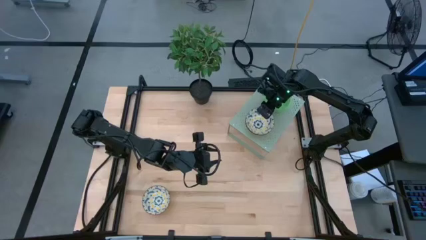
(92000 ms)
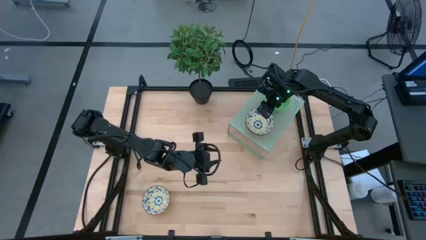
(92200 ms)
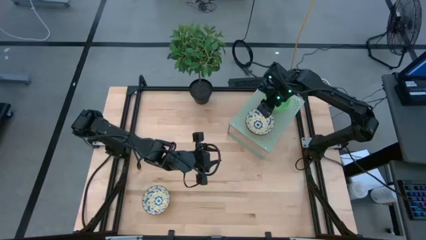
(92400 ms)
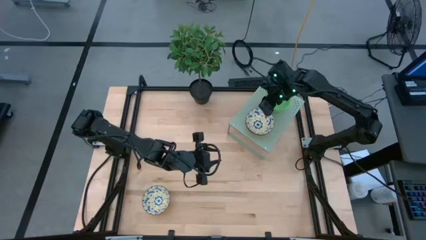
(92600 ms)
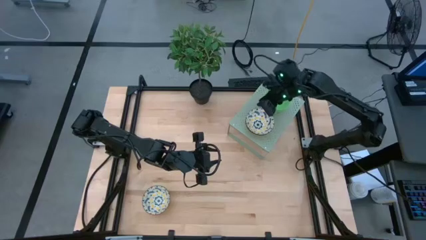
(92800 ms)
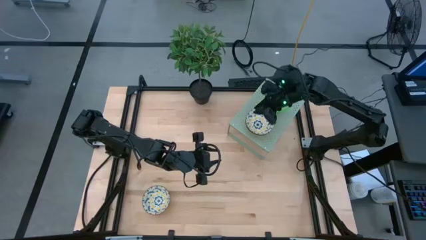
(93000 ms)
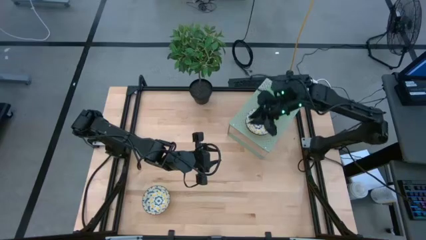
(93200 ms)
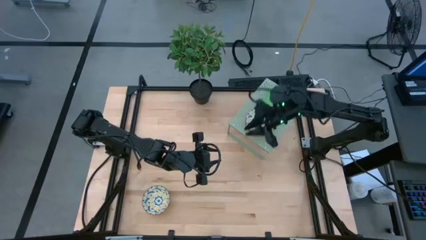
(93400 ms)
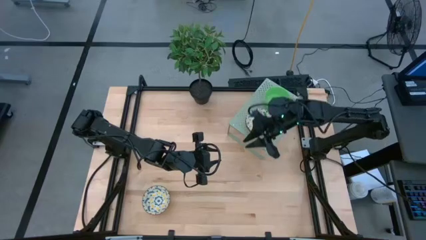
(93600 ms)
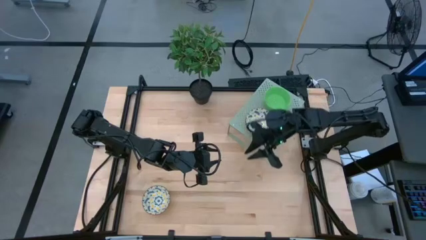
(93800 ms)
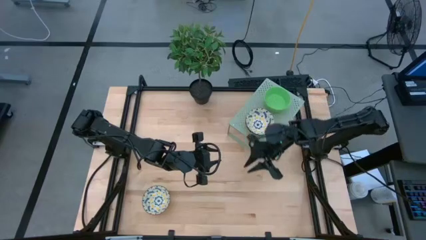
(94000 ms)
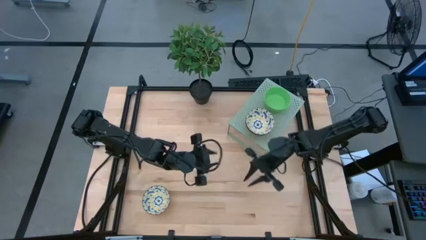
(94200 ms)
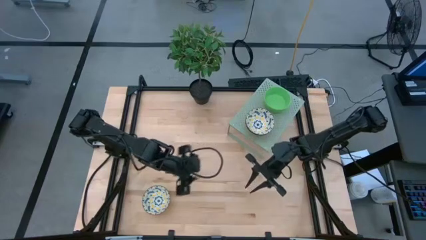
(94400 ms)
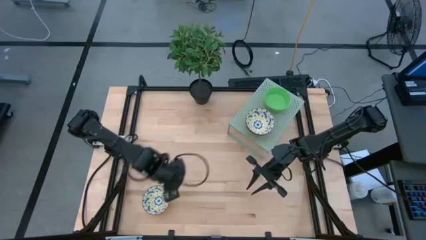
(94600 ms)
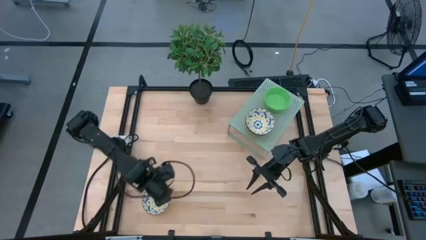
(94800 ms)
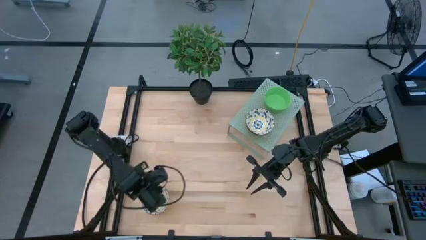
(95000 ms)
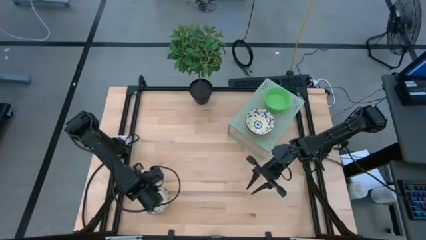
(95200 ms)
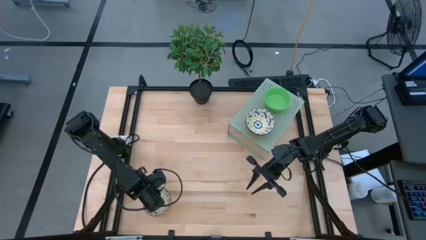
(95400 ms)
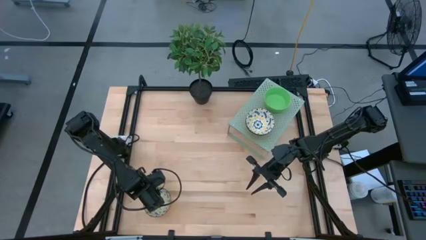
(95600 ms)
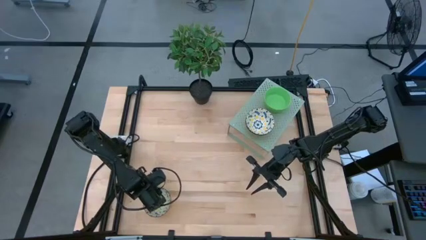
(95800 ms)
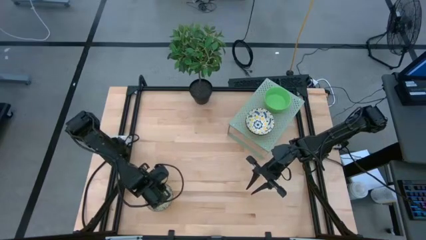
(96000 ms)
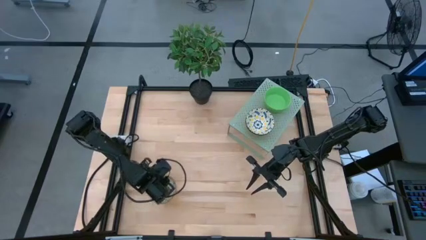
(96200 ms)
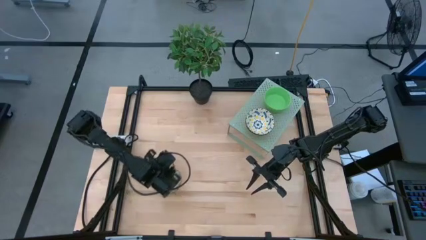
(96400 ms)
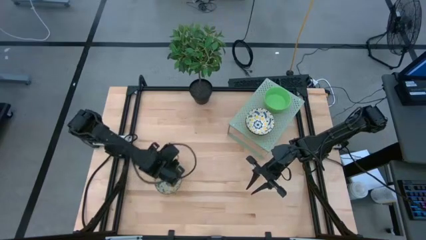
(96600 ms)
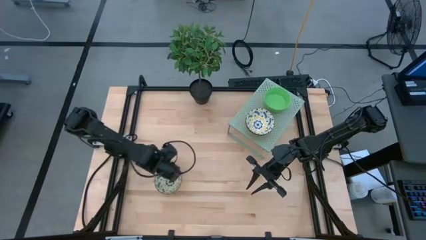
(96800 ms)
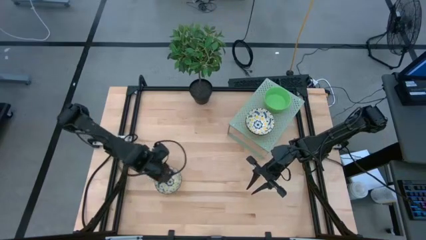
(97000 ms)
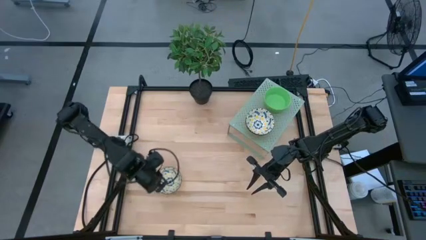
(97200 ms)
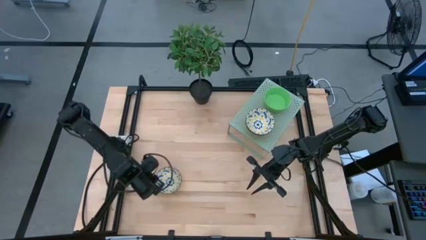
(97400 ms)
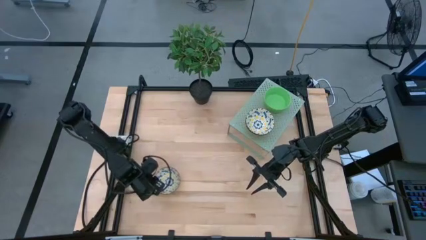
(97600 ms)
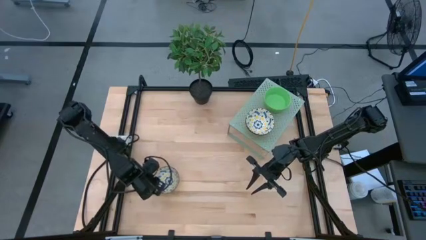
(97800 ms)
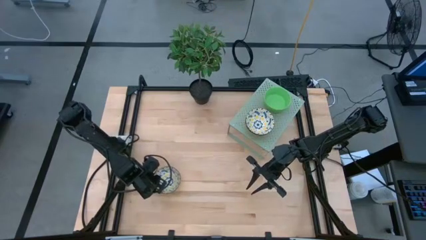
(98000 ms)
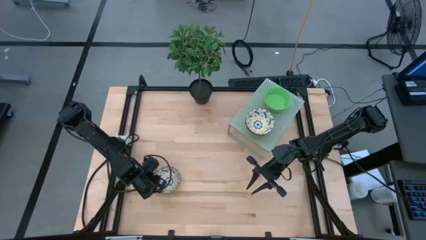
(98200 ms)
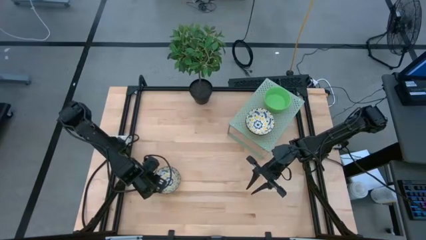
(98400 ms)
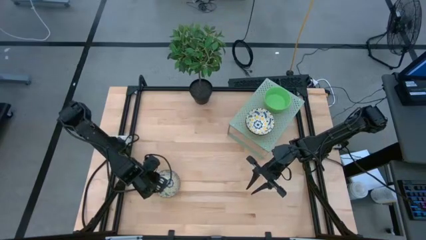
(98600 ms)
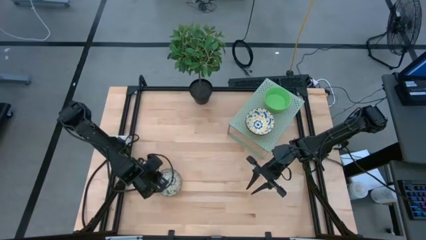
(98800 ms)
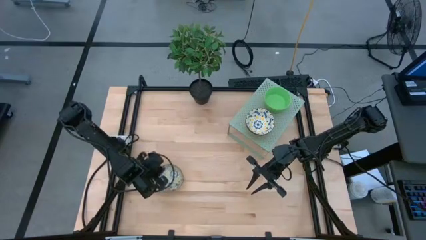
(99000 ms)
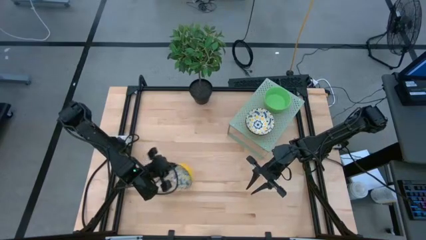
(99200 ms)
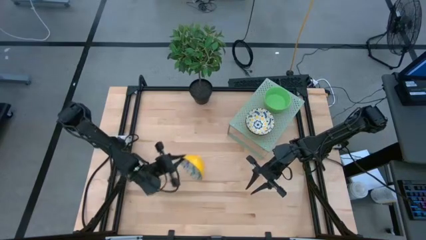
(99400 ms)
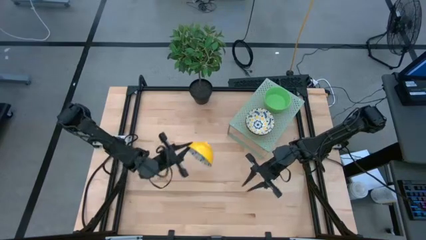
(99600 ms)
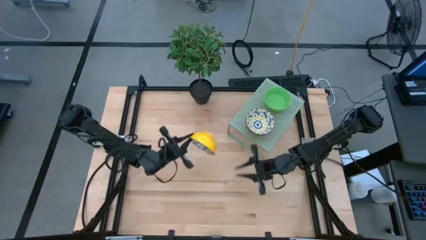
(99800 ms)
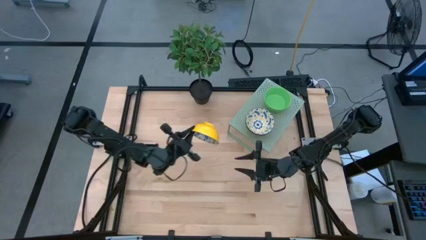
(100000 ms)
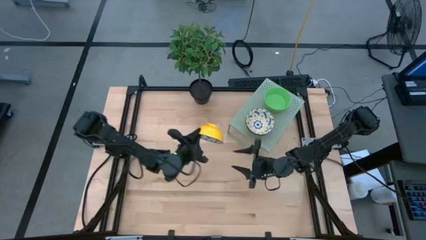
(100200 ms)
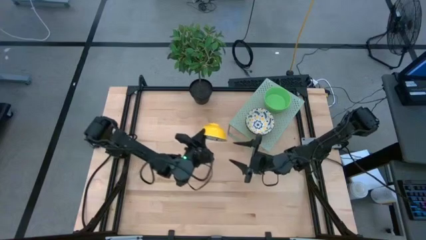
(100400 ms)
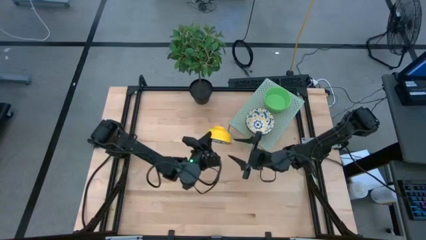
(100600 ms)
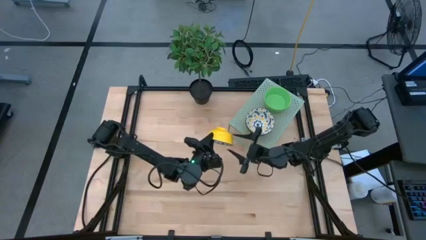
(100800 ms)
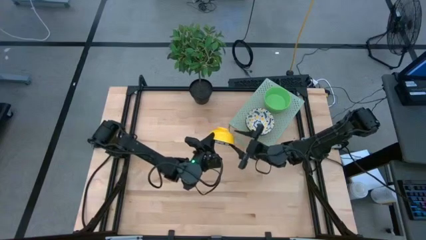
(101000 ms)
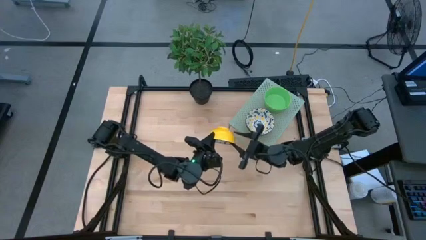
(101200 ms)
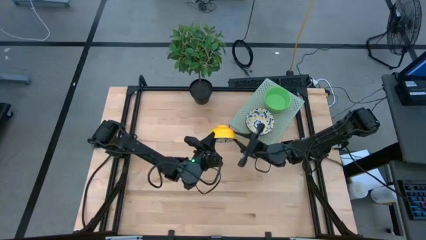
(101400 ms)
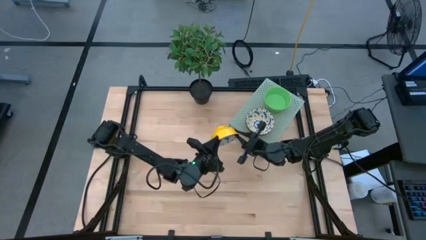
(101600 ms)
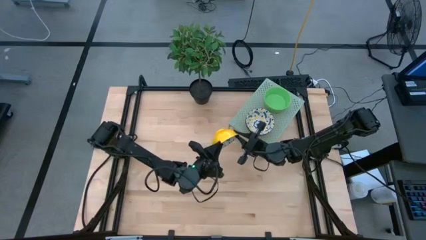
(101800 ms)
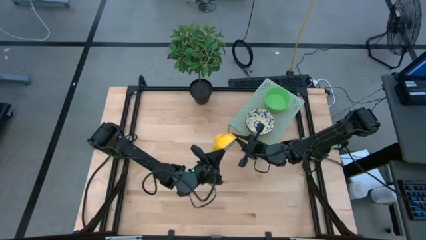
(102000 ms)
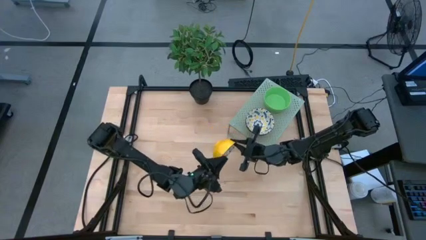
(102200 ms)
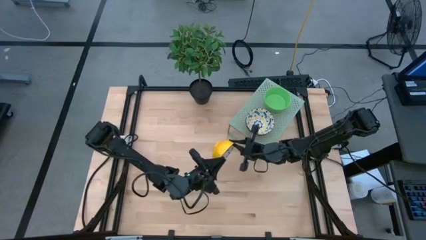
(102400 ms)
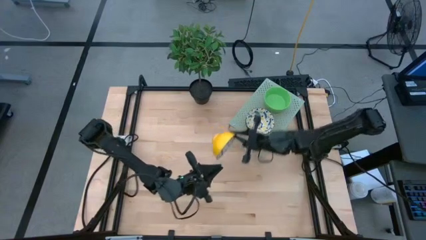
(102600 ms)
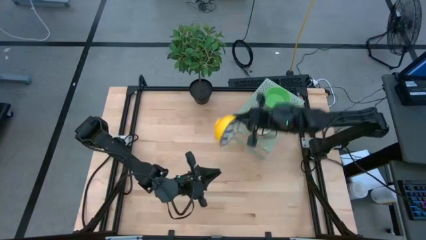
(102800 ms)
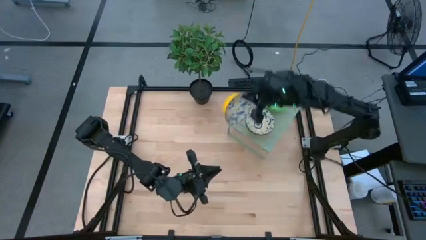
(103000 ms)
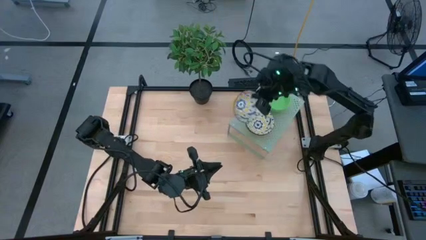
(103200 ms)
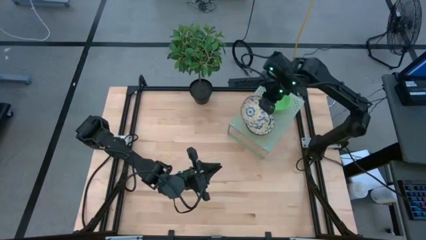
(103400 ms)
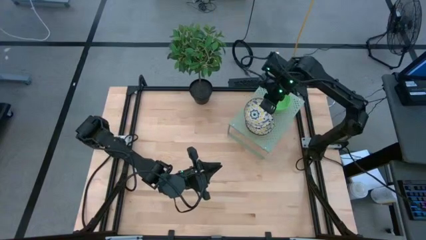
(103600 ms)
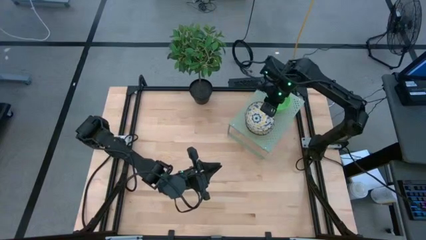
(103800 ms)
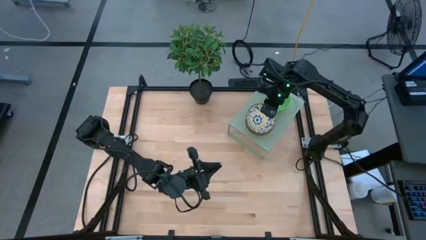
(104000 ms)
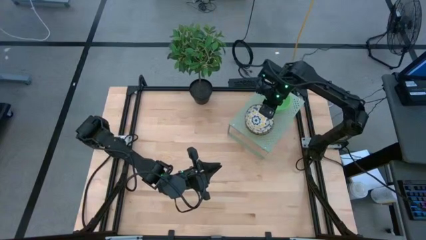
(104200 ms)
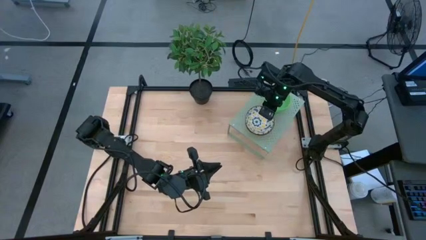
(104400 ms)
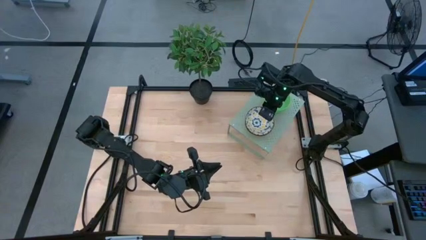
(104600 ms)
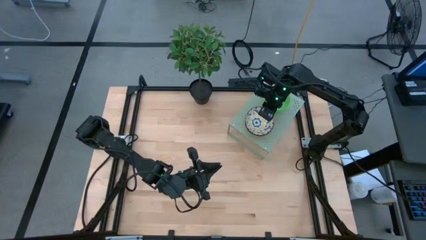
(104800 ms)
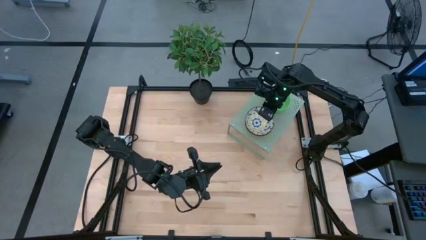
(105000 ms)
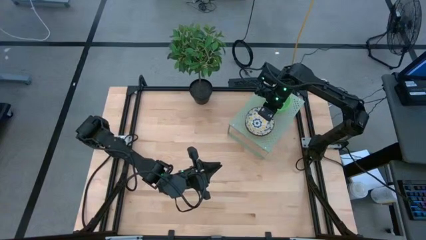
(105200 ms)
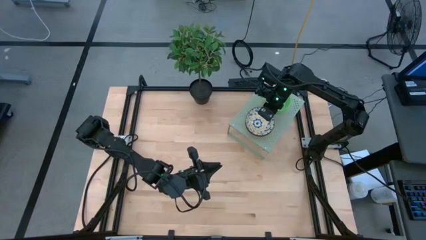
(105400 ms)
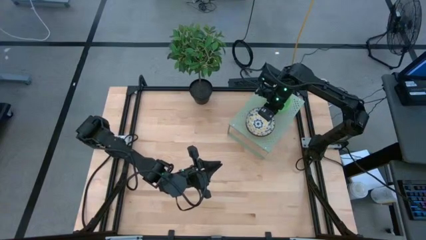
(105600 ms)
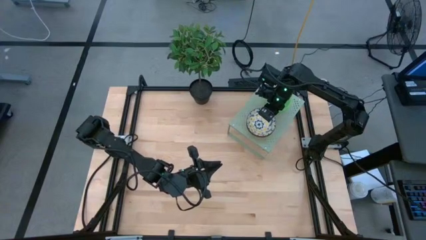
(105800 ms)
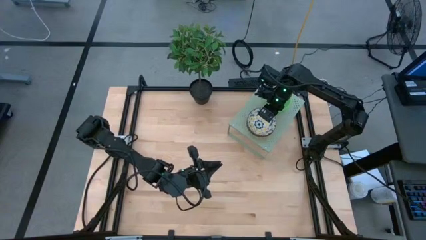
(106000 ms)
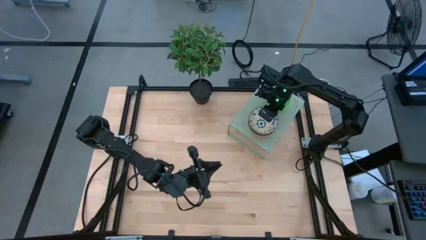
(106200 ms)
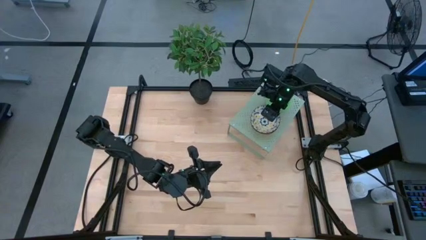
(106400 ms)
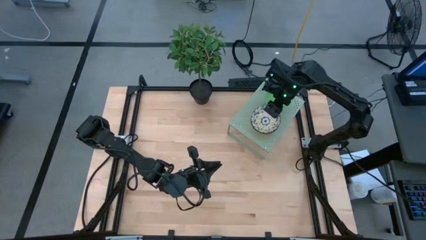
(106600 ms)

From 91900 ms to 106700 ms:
Task: Pick & Place Mini bowls
Stack the white patterned bowl on the white patterned bowls on the shelf
